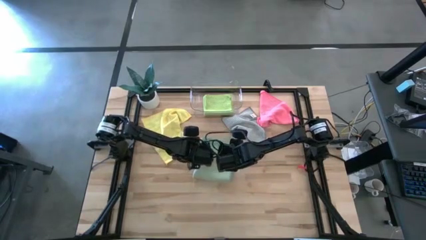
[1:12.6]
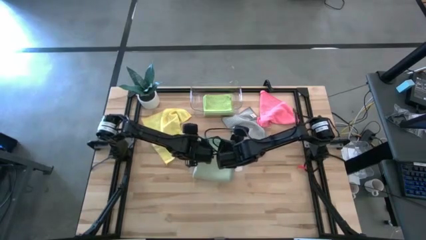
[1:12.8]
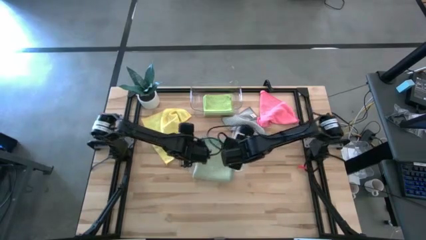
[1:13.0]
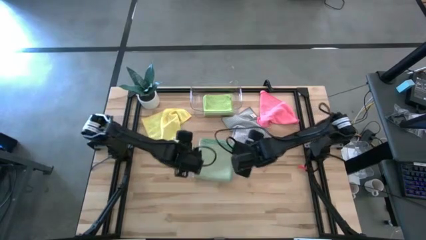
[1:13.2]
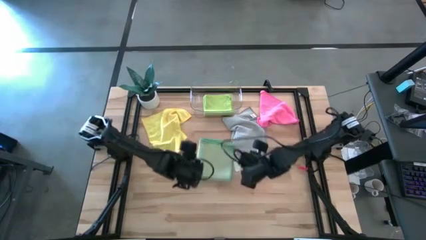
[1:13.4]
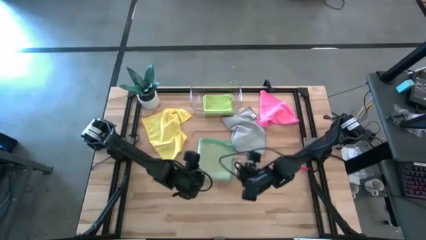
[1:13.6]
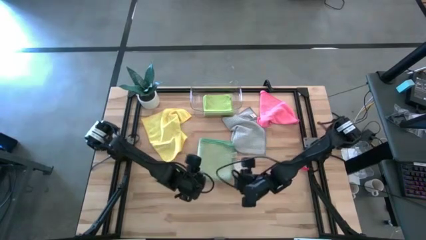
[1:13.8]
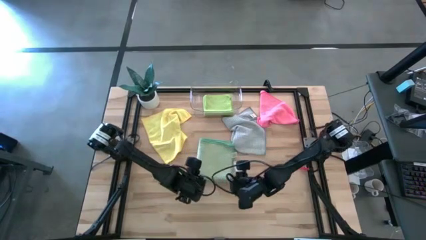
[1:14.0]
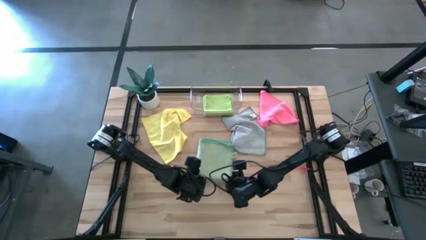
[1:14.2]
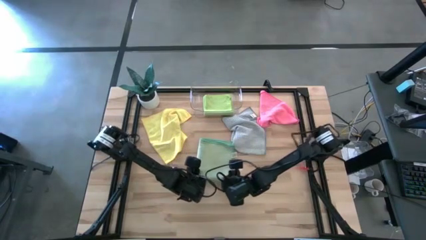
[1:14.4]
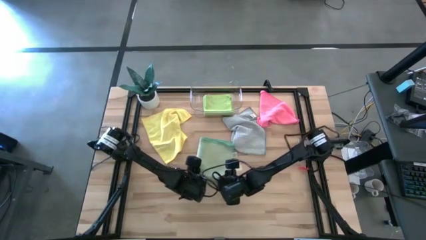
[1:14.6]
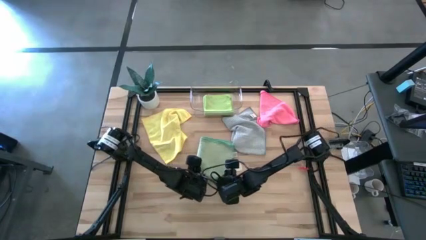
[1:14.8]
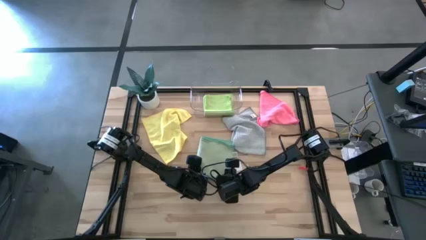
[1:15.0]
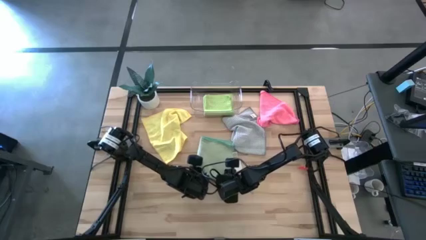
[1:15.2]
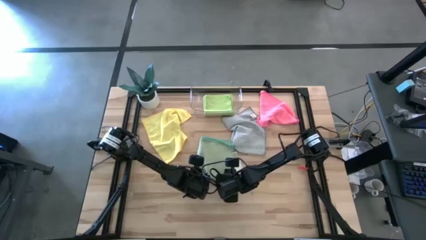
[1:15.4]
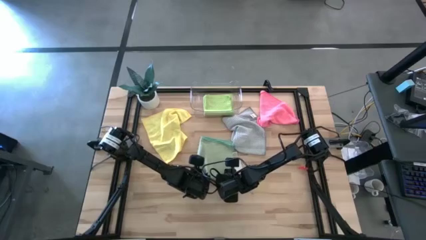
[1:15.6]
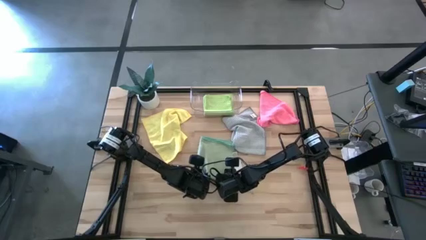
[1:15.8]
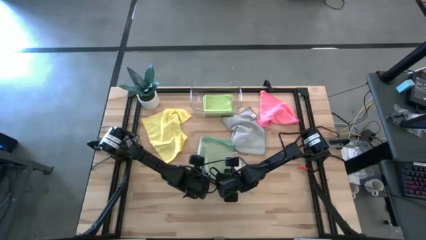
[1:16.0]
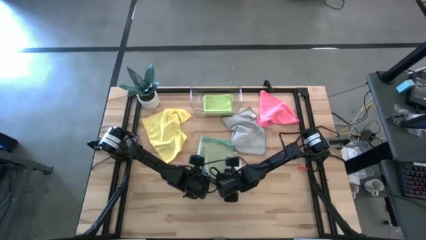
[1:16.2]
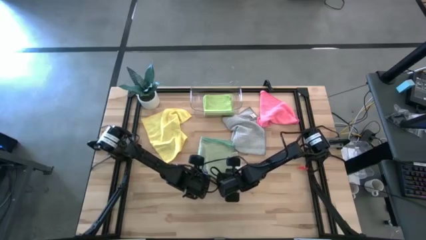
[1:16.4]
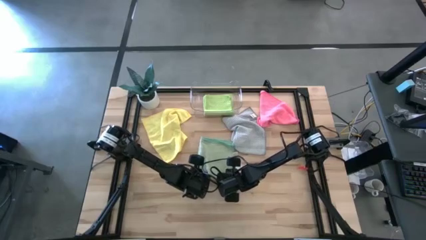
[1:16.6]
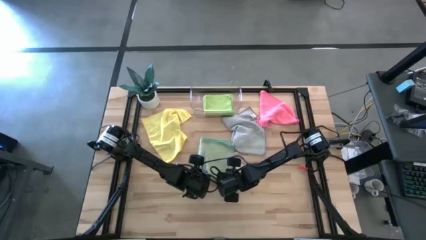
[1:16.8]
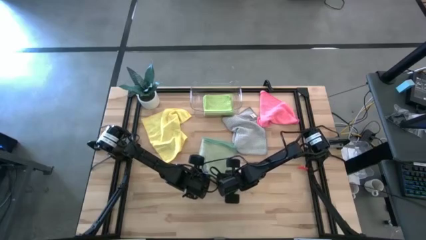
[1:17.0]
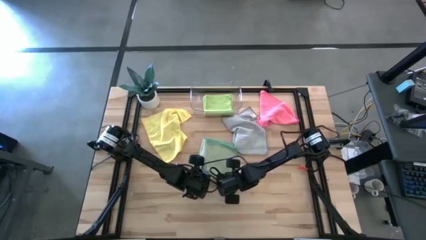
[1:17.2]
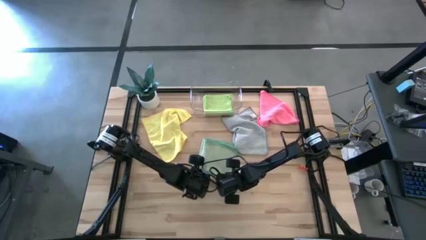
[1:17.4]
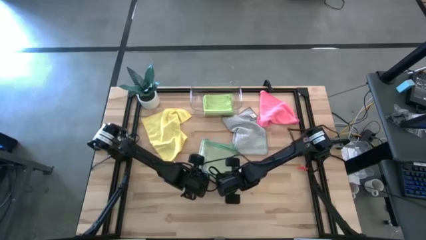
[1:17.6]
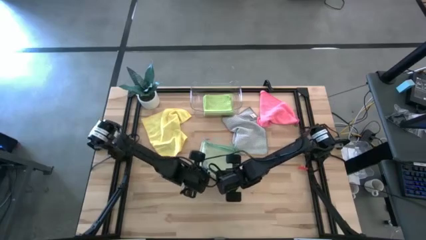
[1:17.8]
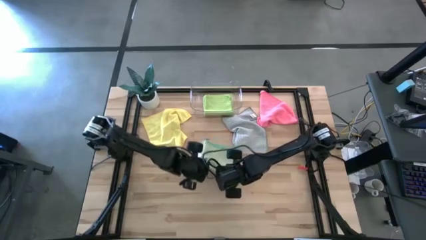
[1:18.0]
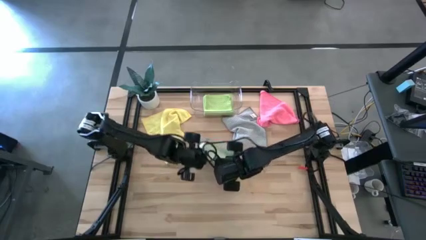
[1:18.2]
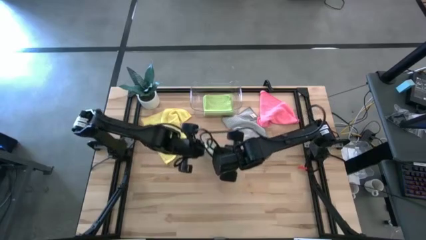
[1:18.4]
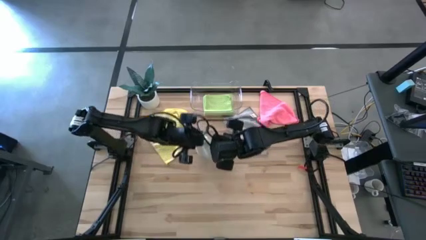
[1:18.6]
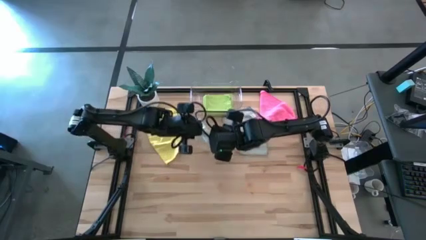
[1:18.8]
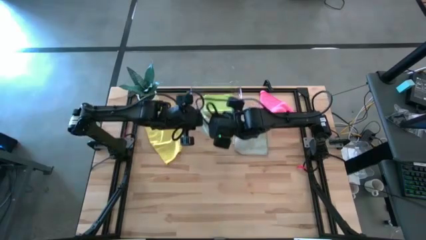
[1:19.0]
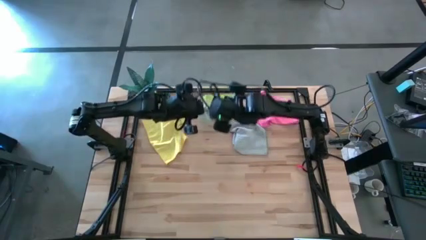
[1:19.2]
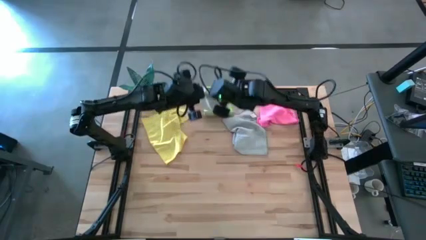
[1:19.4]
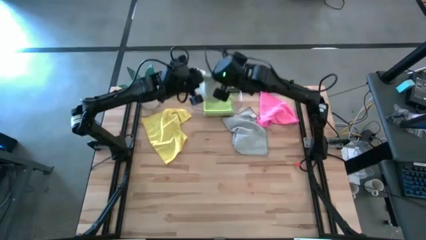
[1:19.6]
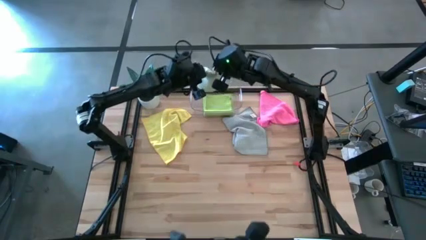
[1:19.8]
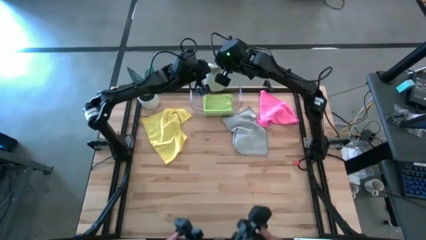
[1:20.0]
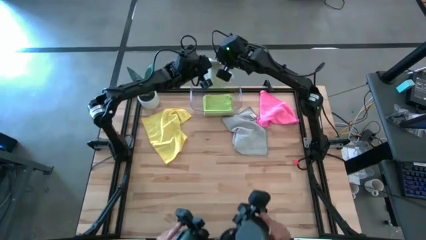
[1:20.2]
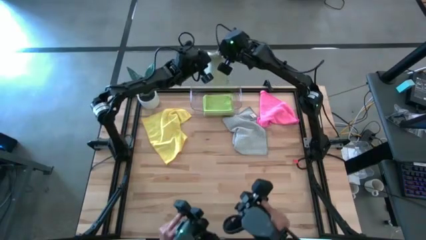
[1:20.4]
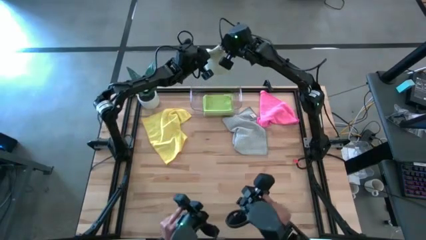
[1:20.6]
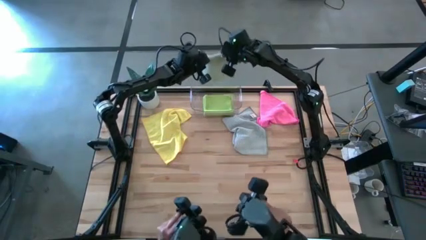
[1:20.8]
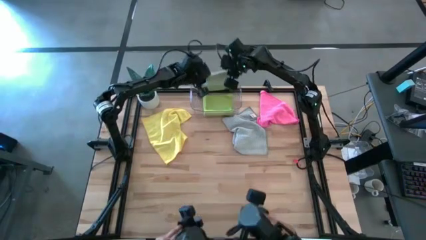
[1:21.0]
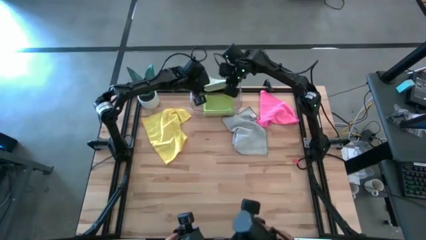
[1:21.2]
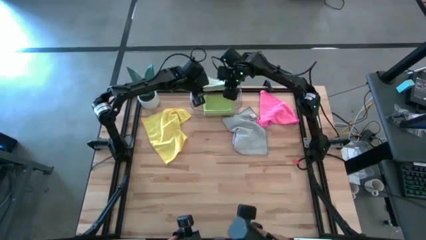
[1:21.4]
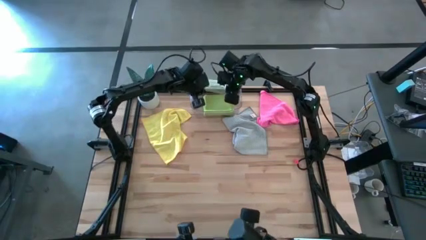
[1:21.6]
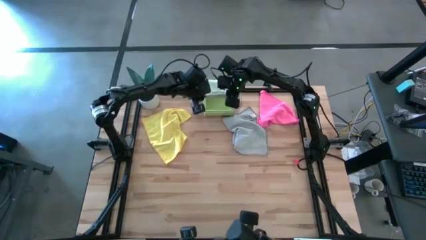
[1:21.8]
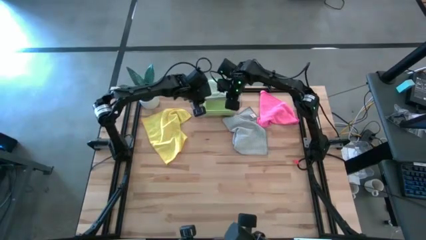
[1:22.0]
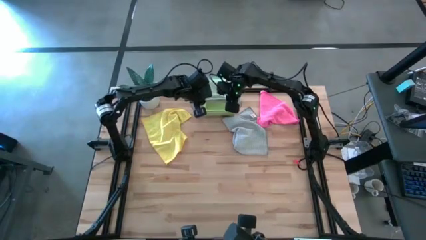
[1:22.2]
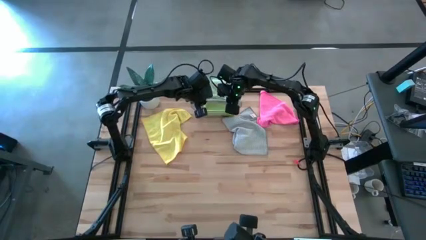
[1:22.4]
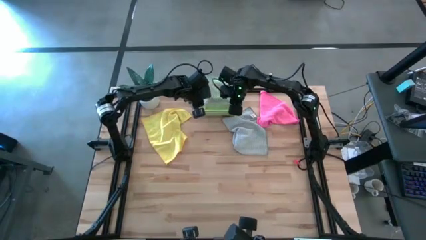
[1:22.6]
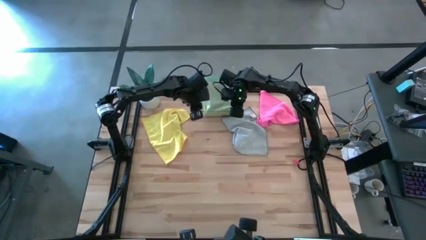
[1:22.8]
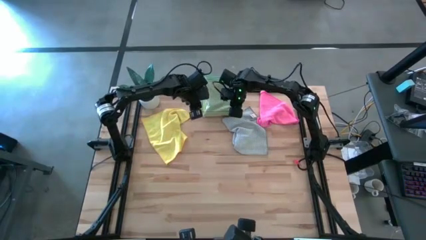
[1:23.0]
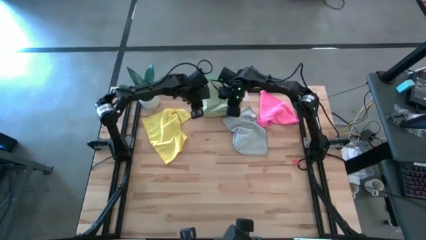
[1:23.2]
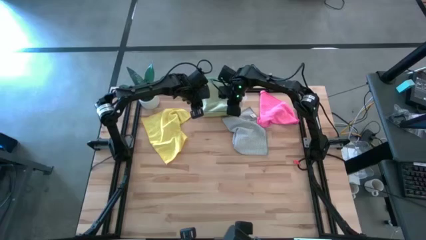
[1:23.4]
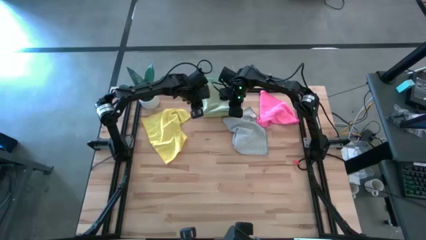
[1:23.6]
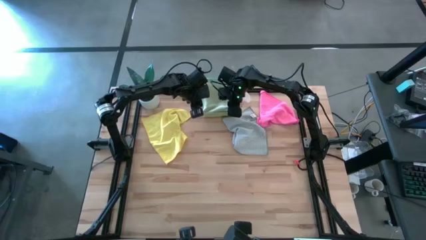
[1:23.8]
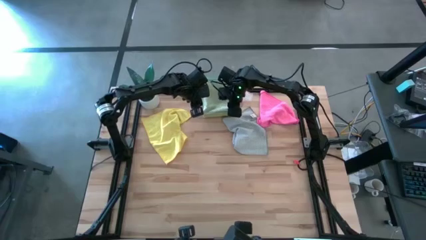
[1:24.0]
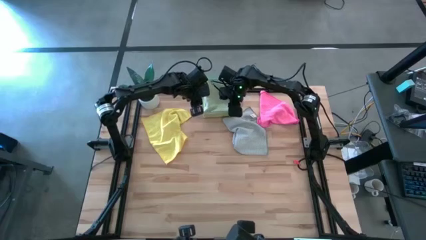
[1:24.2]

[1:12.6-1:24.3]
Task: Fold microfiber towels
Put the light green microfiber cloth into the transparent bin

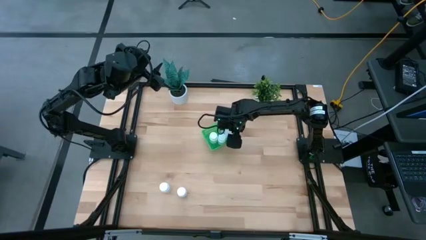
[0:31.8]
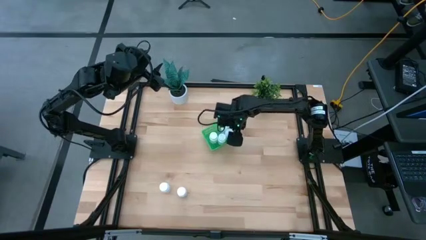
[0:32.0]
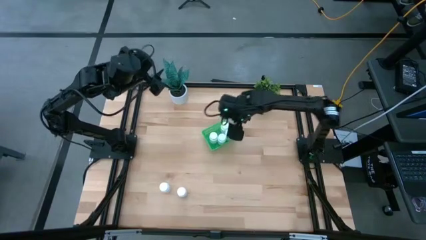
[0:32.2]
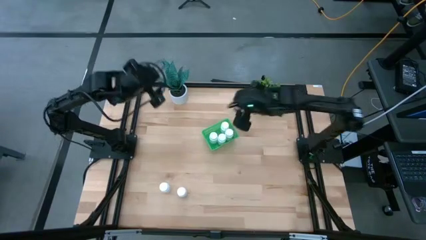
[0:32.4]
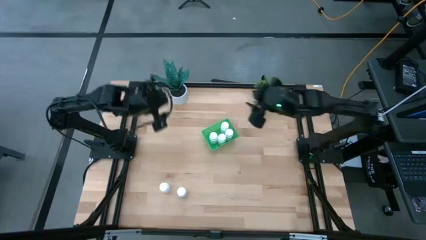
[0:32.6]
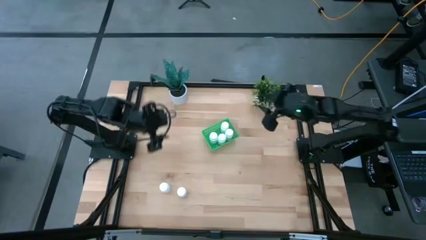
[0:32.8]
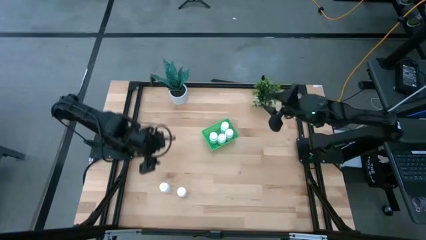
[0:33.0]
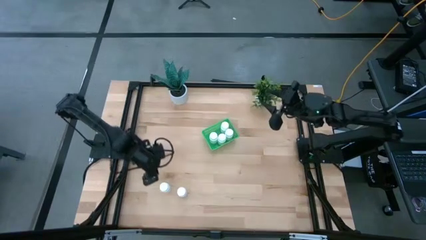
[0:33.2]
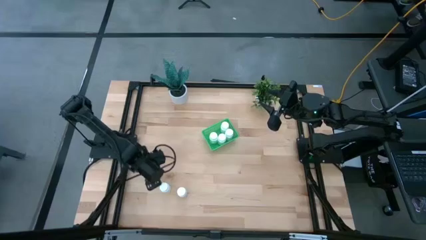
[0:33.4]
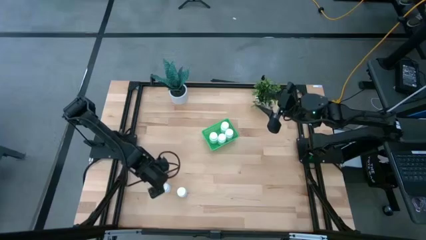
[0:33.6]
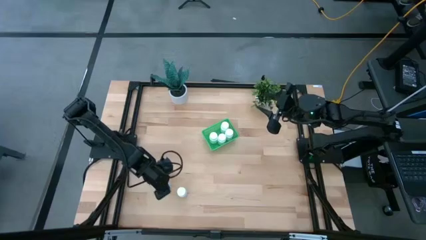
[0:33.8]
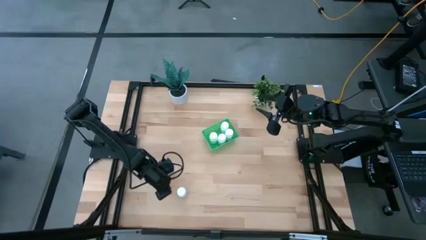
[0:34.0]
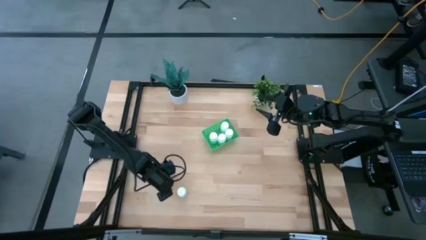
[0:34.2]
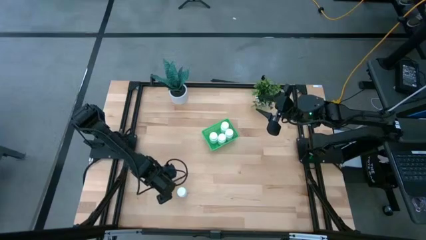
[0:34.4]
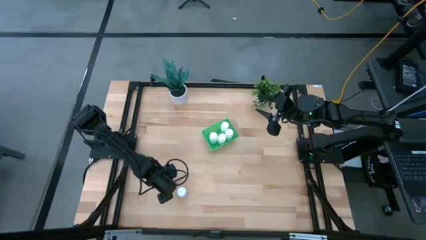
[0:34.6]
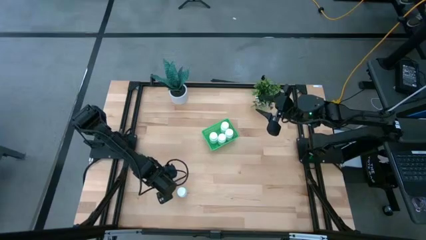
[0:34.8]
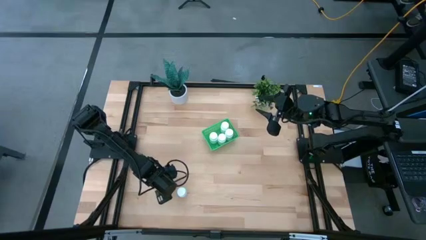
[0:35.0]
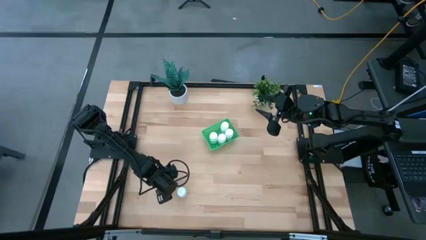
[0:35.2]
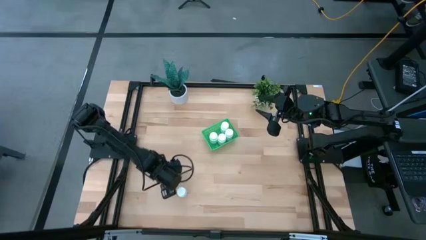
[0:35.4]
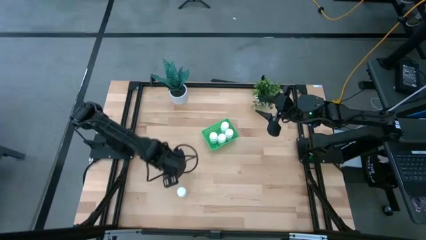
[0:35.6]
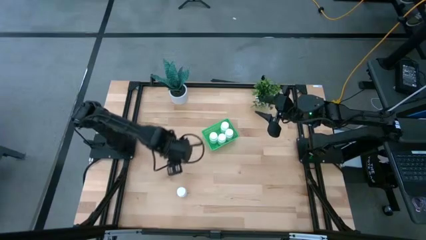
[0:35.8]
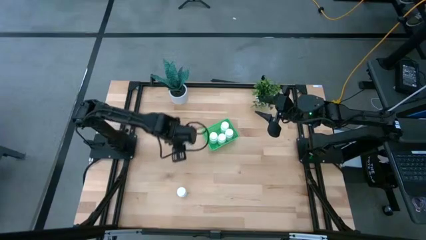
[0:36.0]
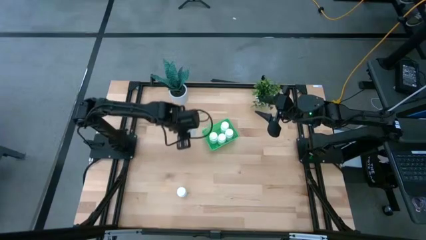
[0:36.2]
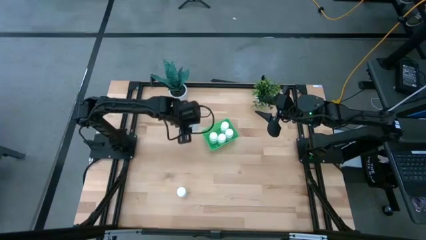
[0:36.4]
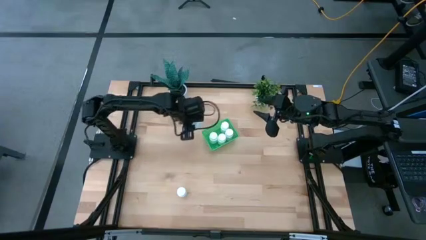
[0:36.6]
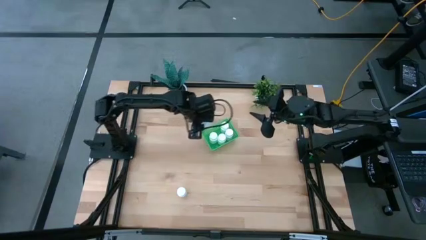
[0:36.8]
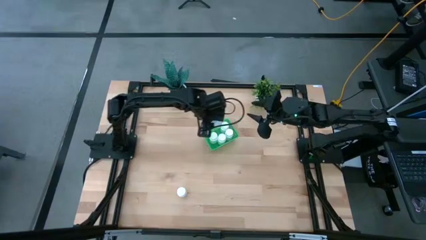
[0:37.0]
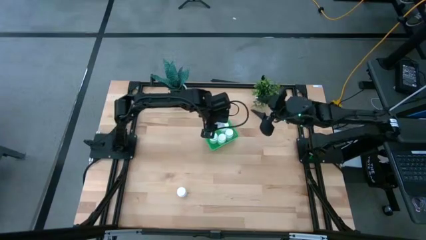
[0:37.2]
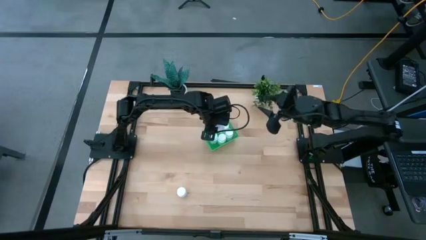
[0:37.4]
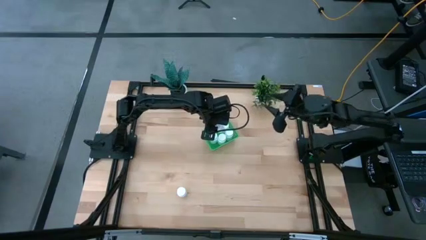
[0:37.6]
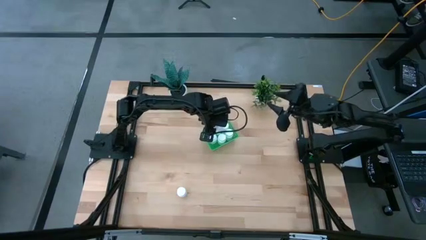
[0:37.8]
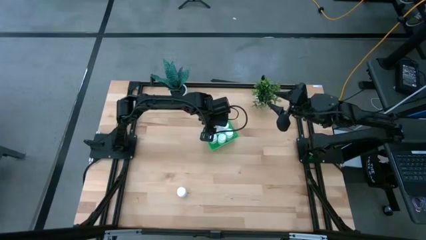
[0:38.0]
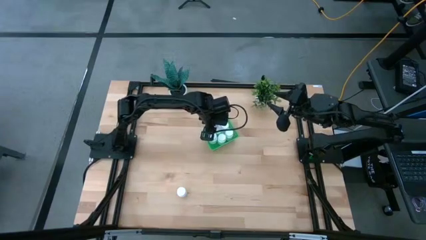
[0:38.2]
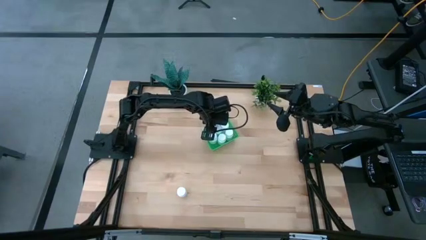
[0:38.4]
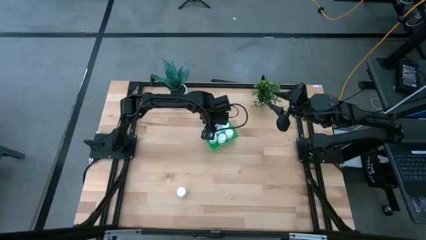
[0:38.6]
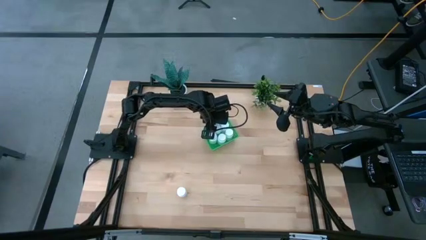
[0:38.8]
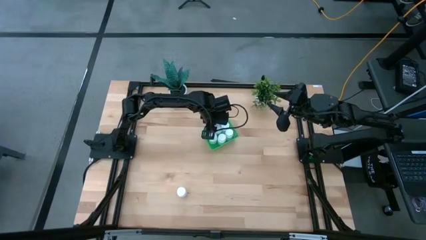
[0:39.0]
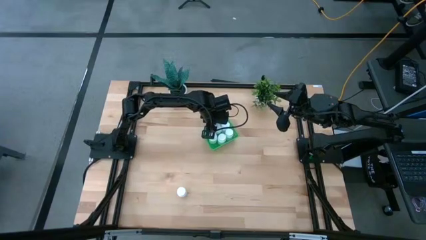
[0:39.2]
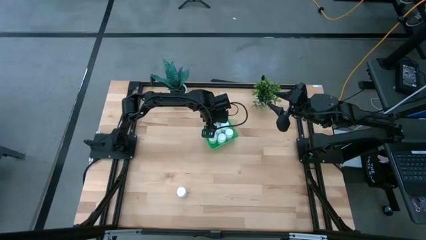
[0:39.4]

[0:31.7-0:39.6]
Task: Pick and place pill bottles into a basket
Put the white pill bottle into the green basket
